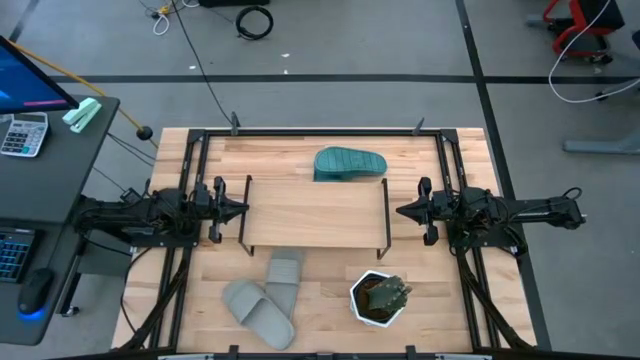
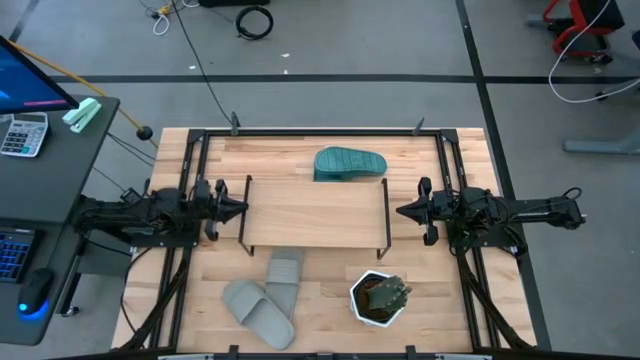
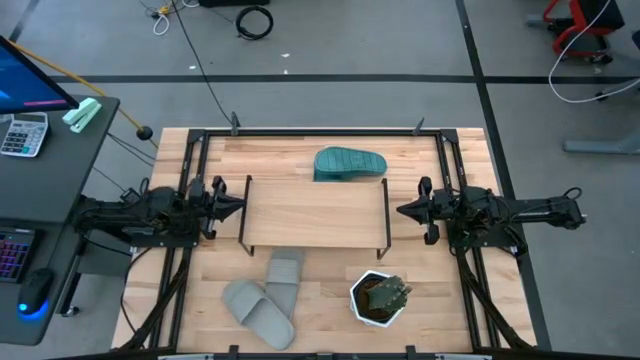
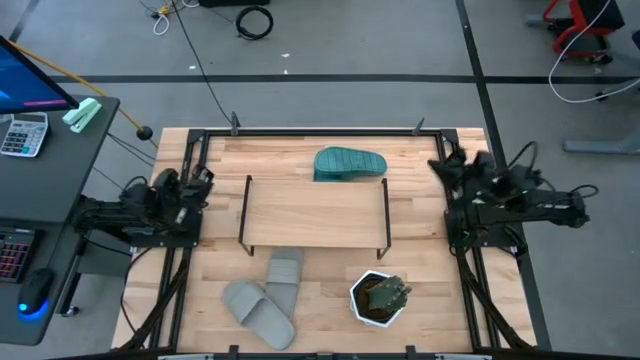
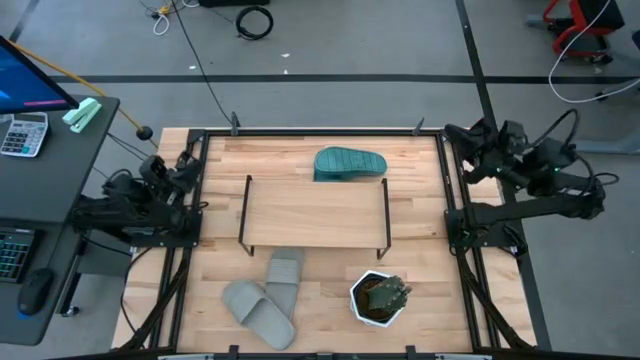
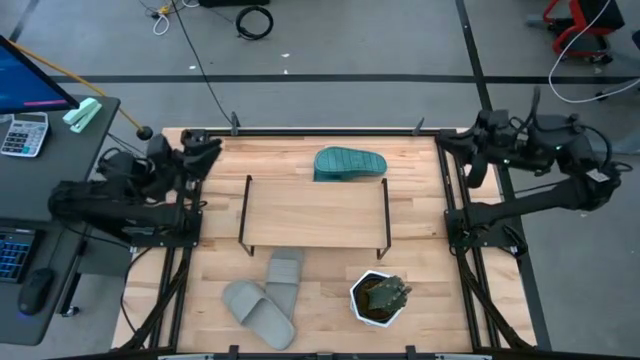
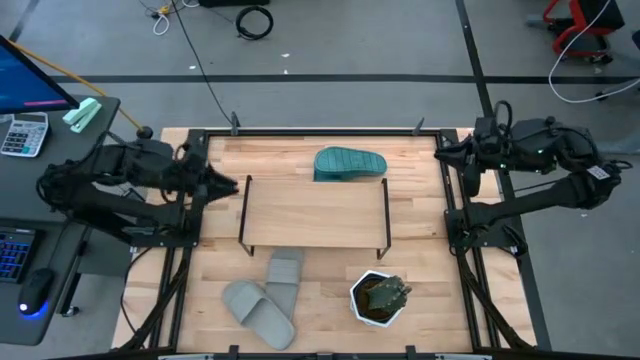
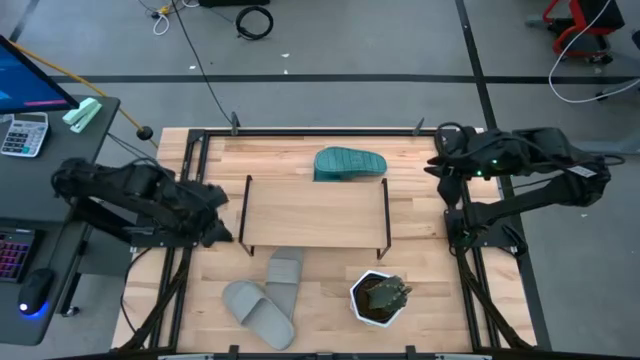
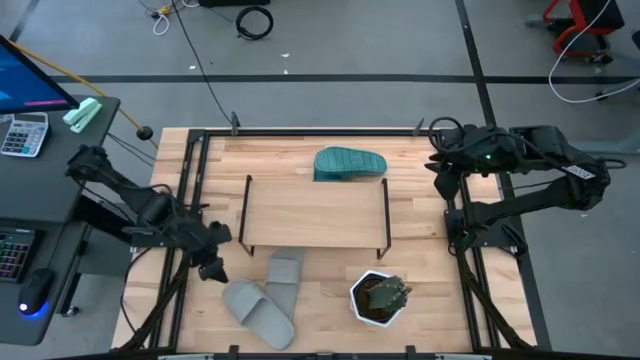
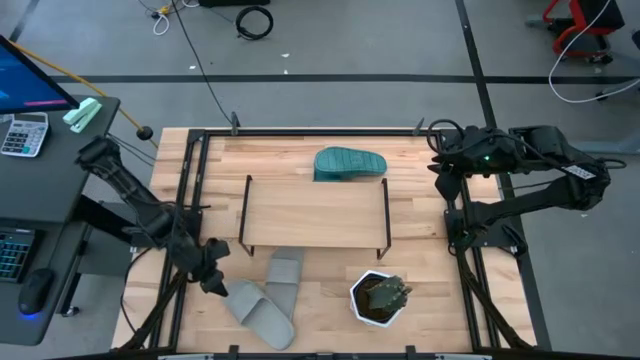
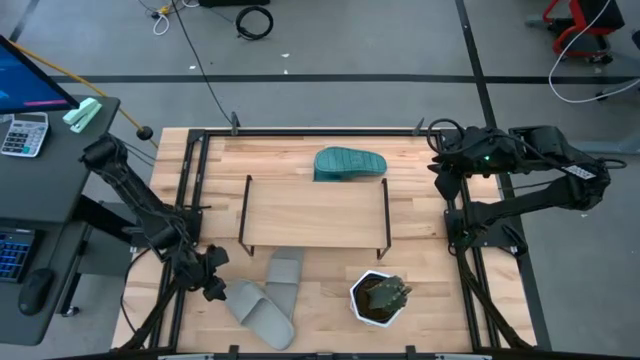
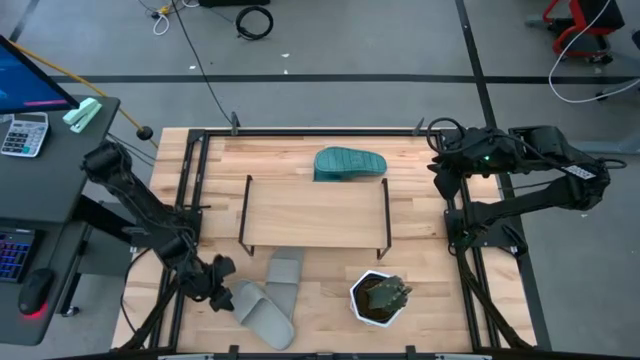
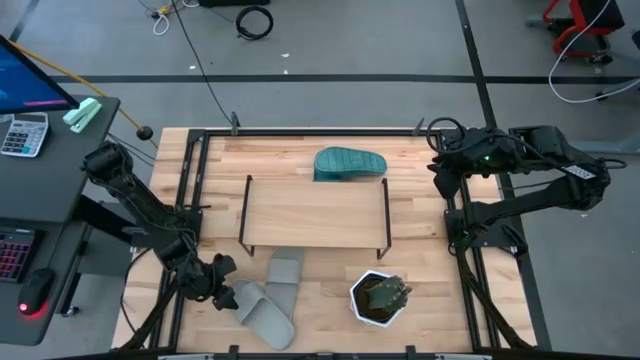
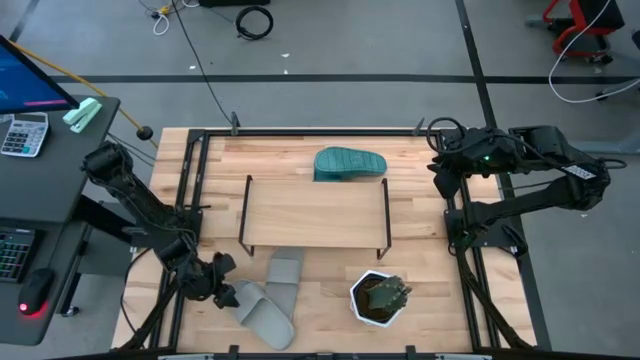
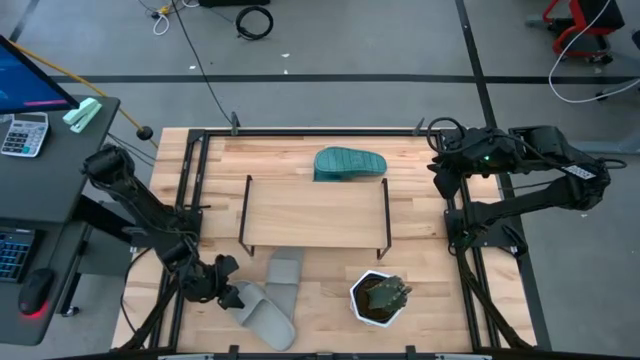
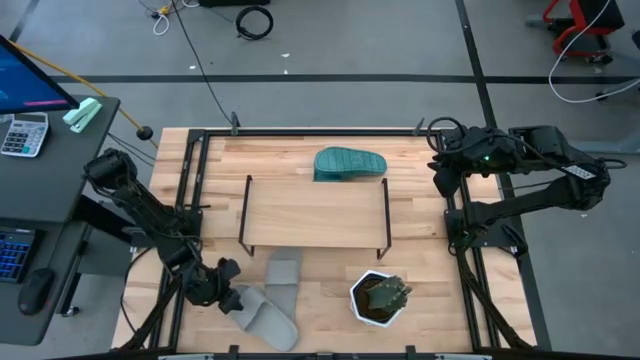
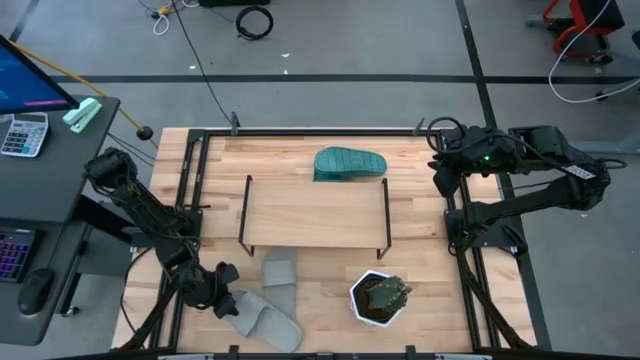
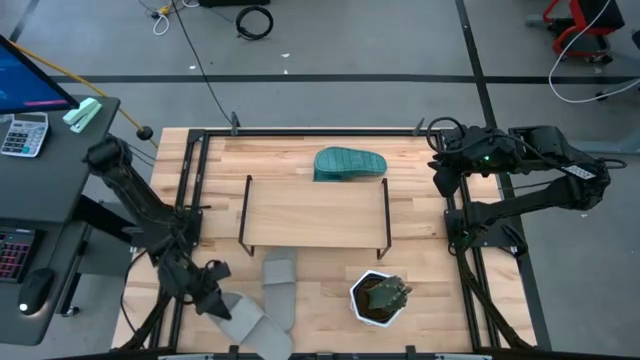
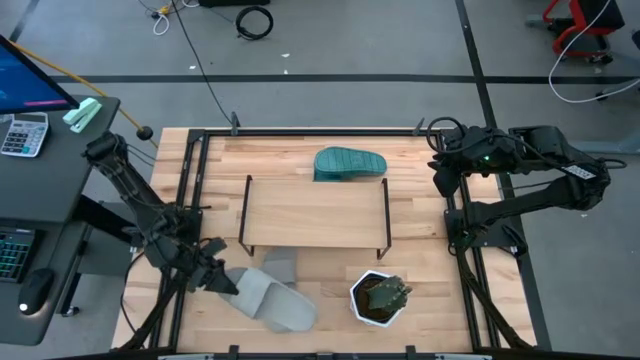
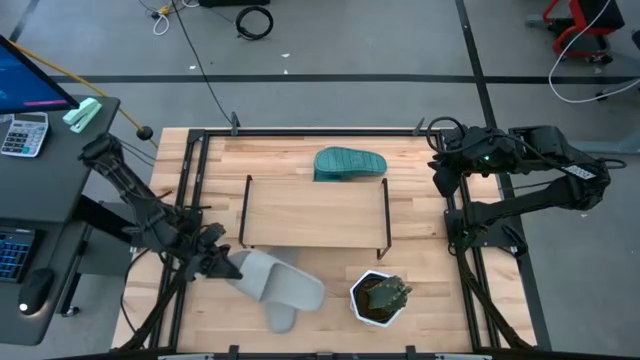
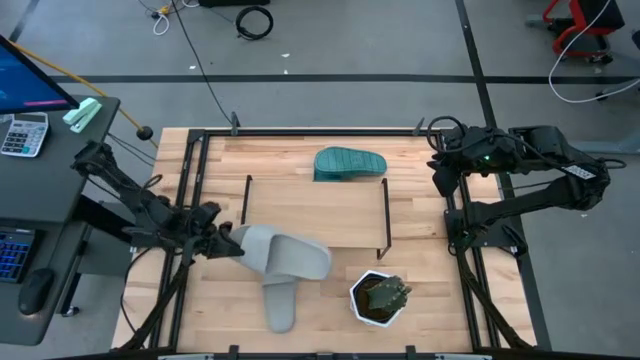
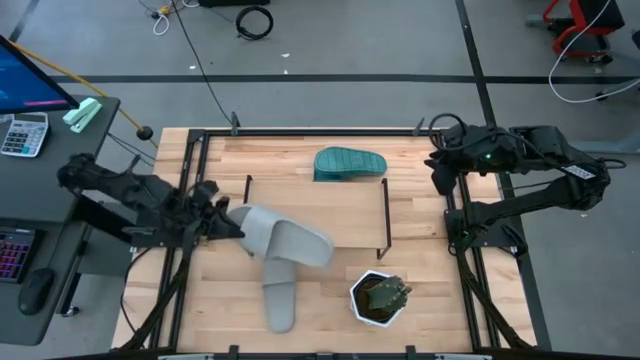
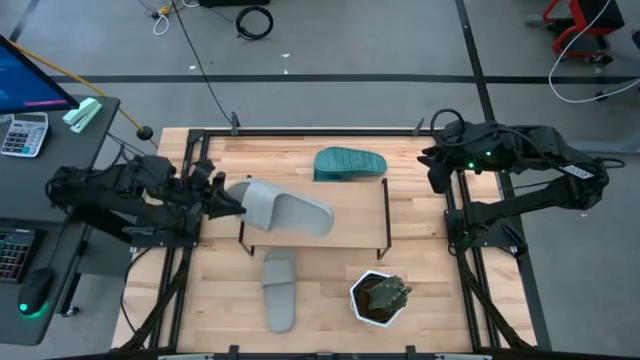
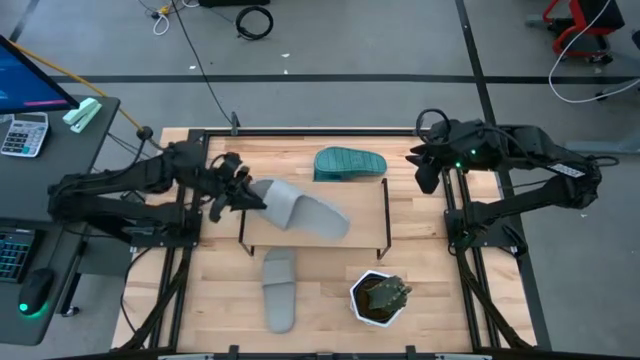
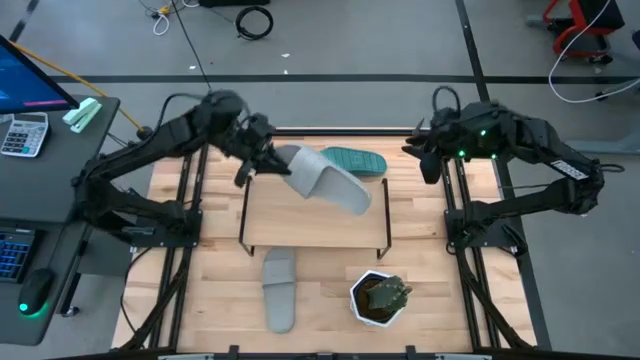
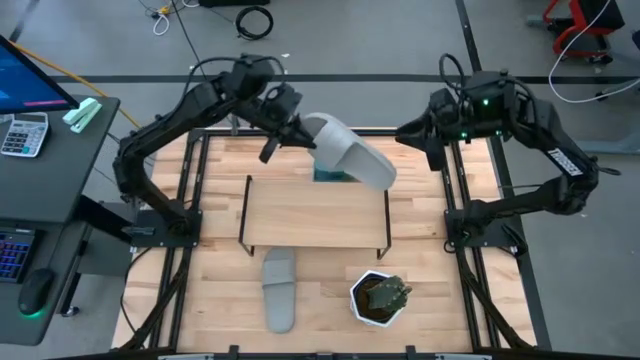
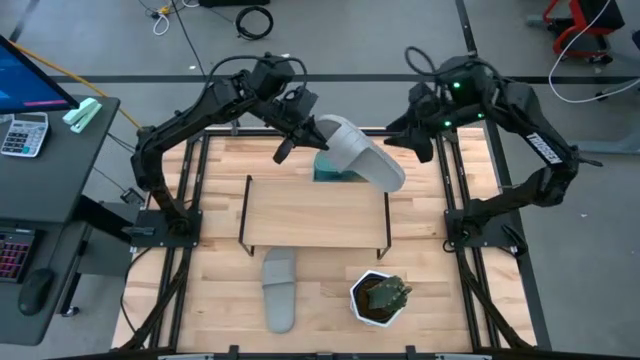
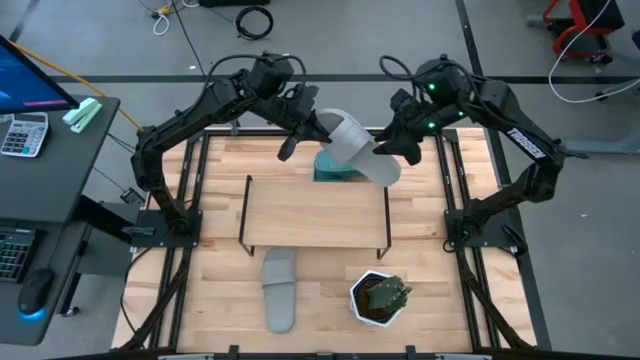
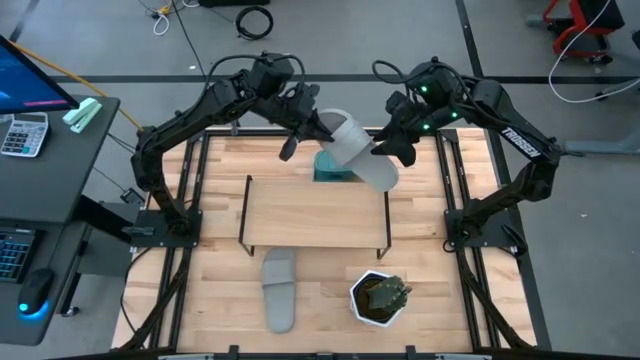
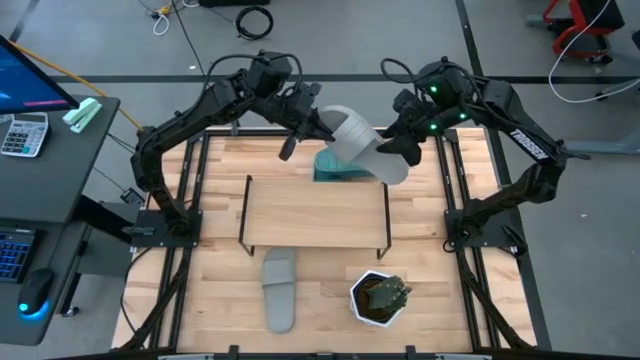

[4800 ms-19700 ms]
Task: Pick and place slides into the shelf
Put the bottom gray slipper on the shelf

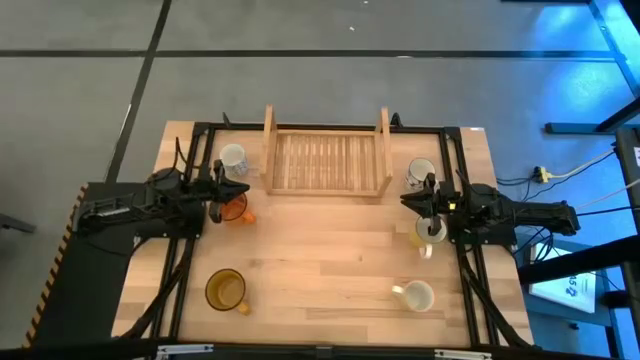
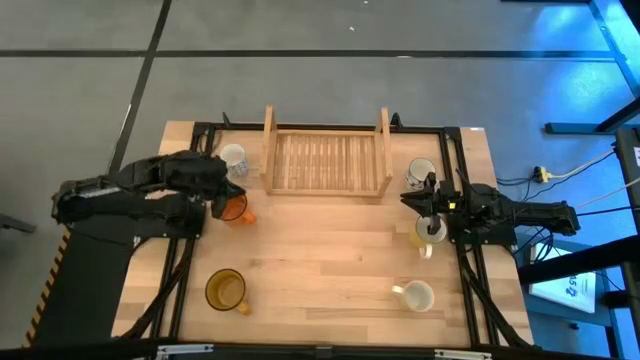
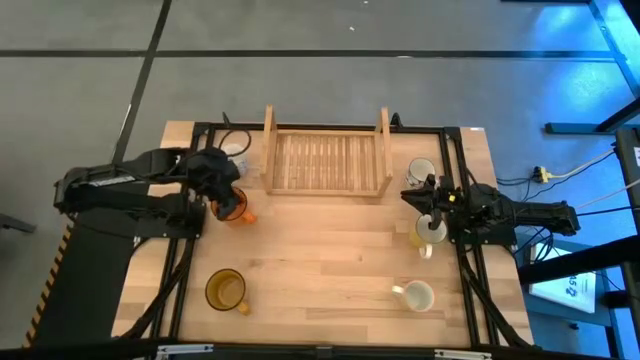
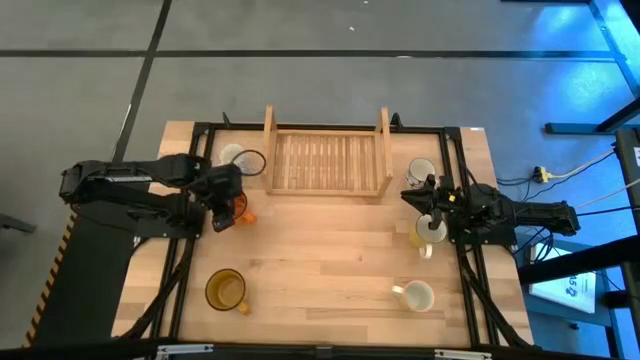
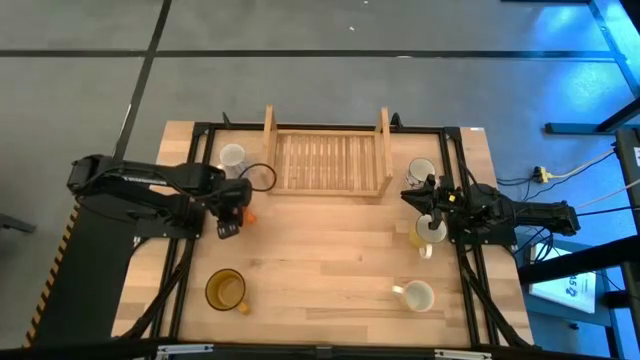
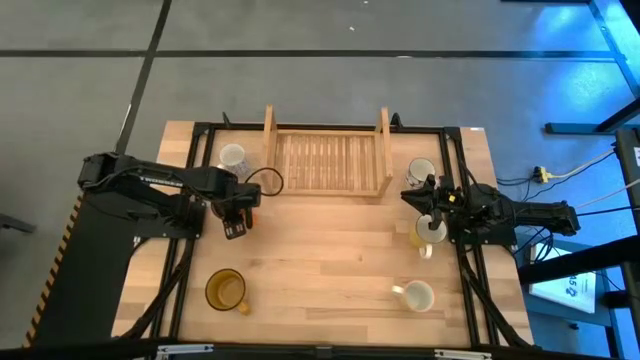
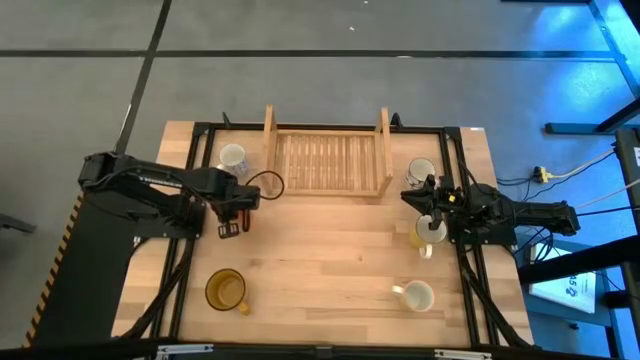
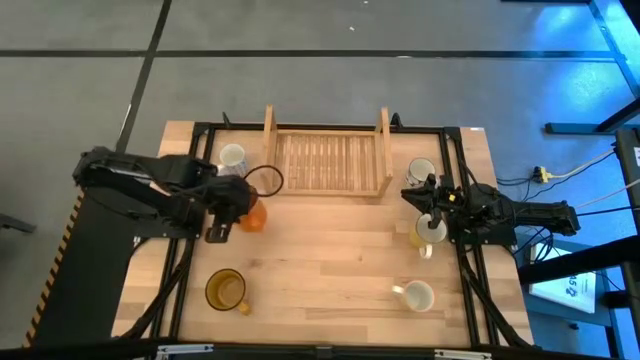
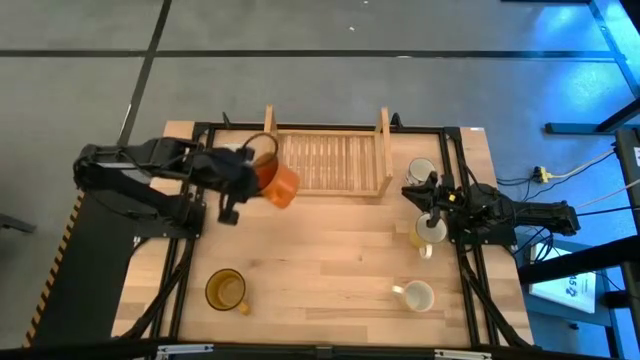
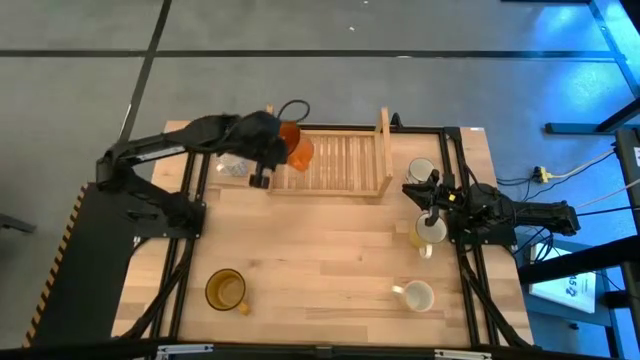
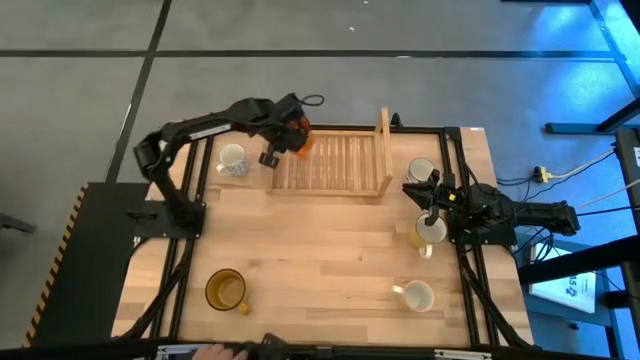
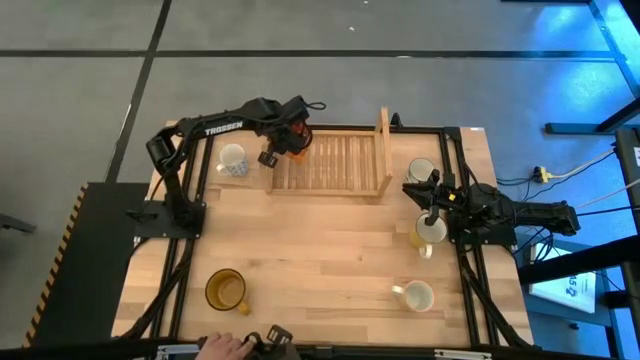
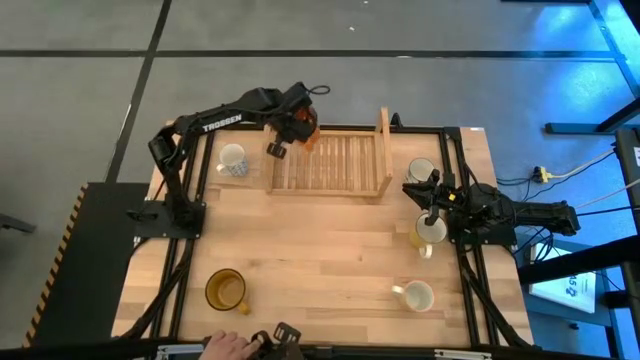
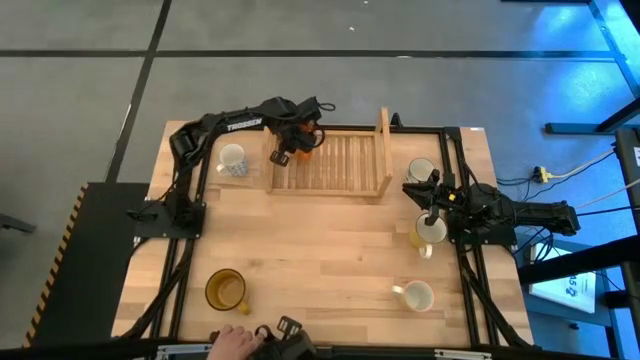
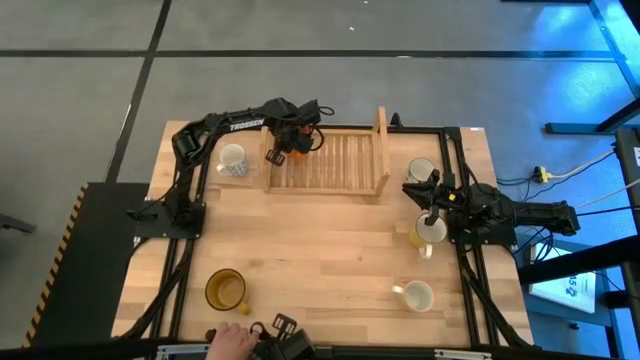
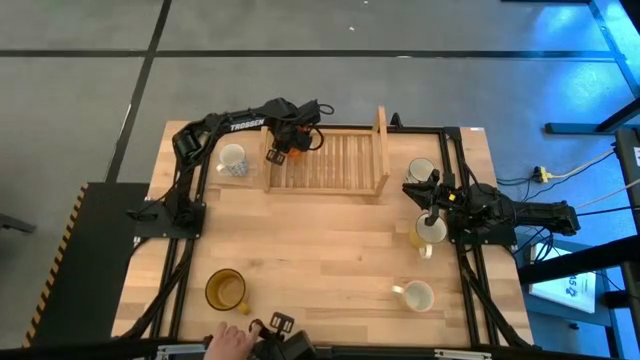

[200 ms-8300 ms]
Task: Place coffee mugs
Put the orange mug on the shelf
